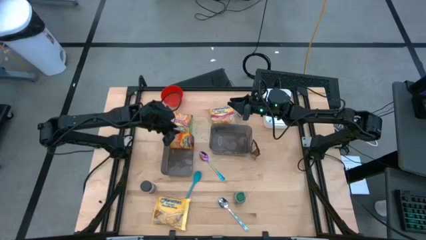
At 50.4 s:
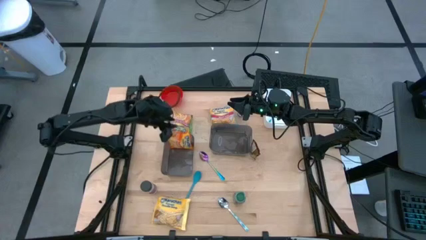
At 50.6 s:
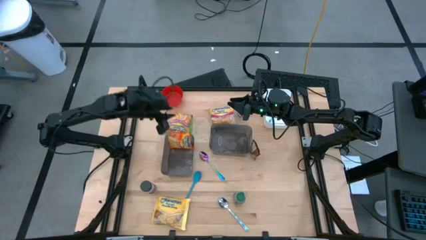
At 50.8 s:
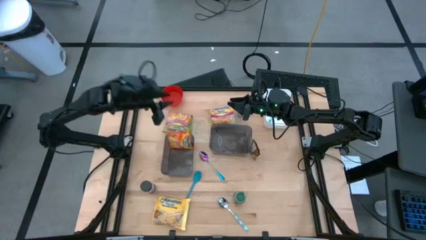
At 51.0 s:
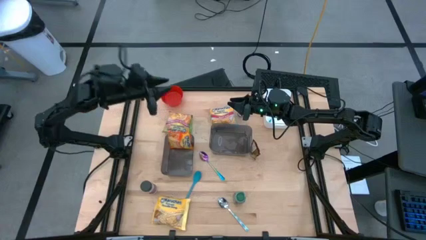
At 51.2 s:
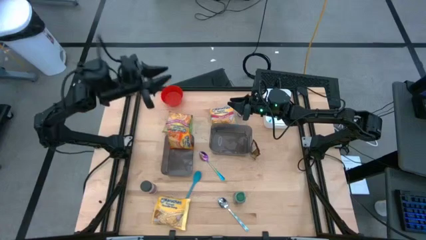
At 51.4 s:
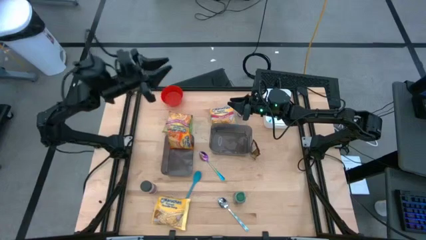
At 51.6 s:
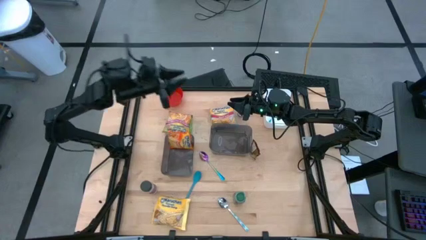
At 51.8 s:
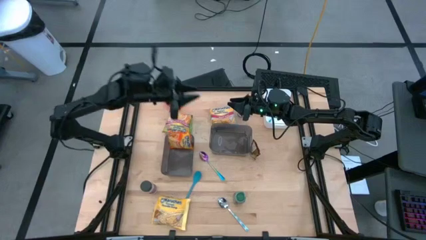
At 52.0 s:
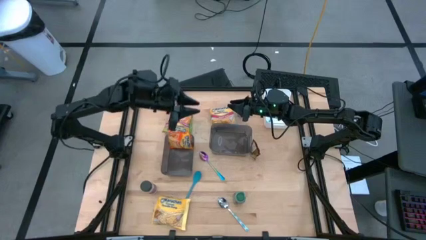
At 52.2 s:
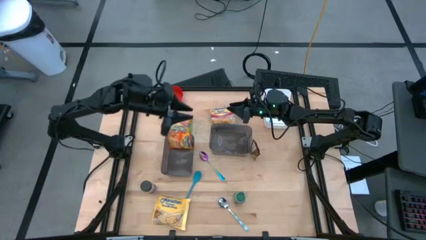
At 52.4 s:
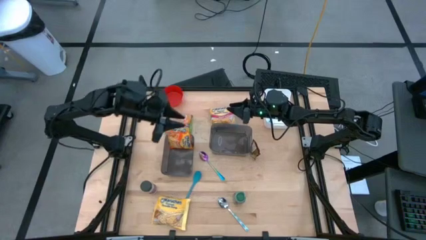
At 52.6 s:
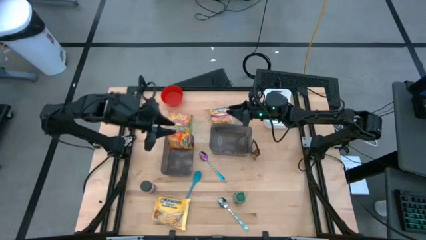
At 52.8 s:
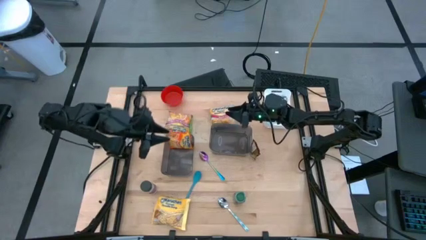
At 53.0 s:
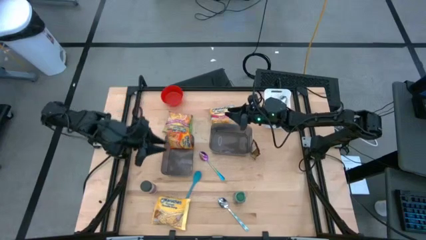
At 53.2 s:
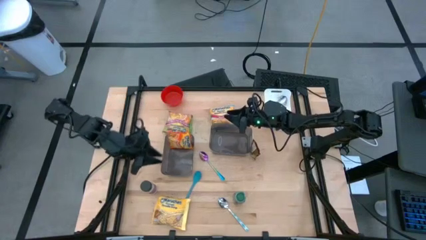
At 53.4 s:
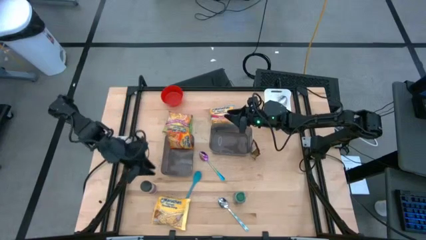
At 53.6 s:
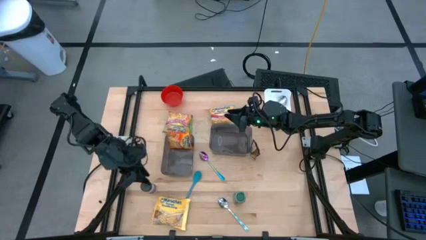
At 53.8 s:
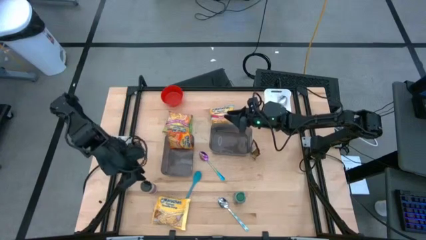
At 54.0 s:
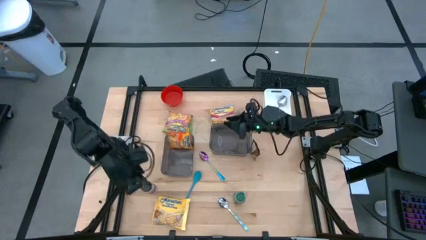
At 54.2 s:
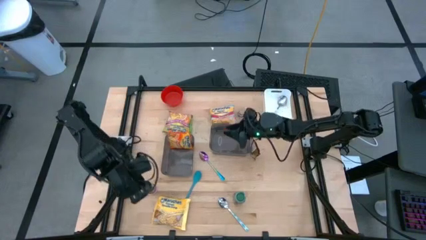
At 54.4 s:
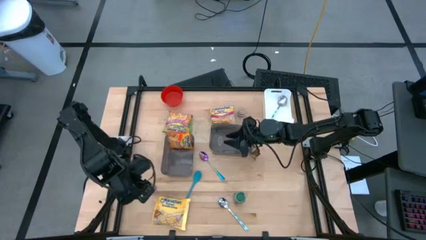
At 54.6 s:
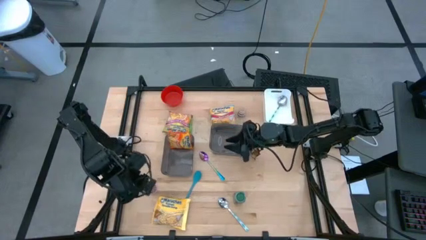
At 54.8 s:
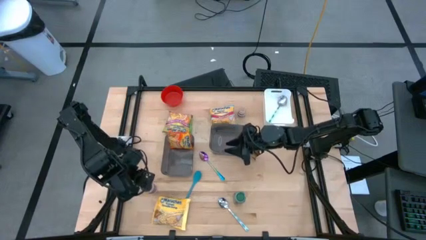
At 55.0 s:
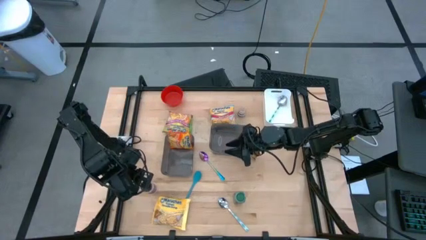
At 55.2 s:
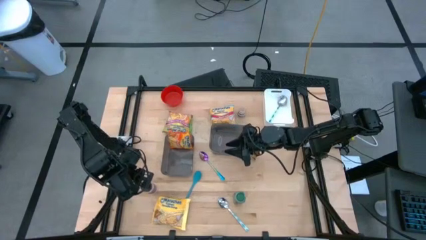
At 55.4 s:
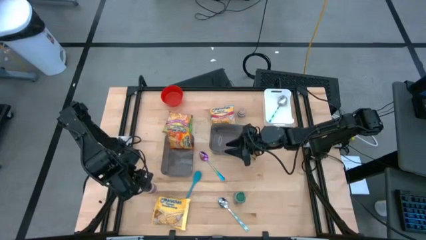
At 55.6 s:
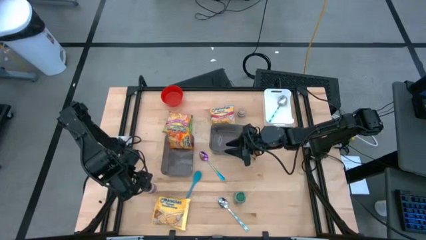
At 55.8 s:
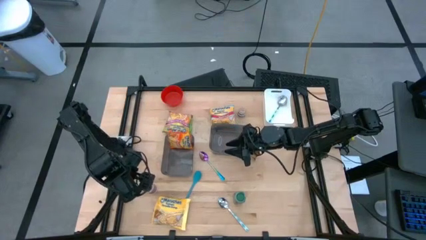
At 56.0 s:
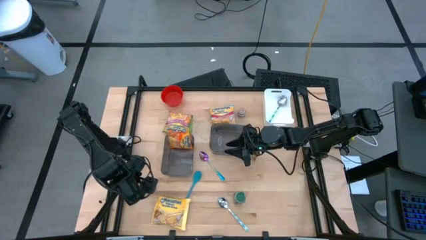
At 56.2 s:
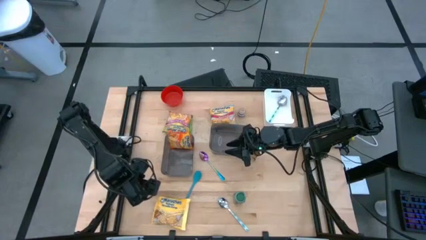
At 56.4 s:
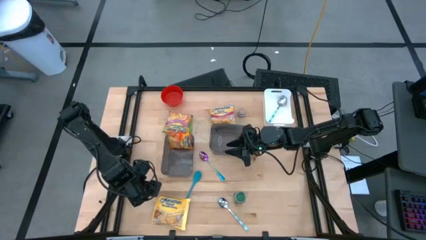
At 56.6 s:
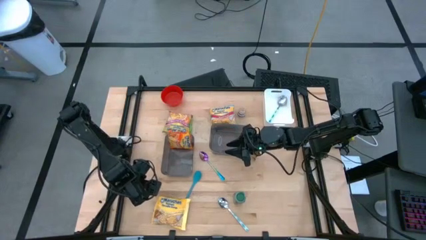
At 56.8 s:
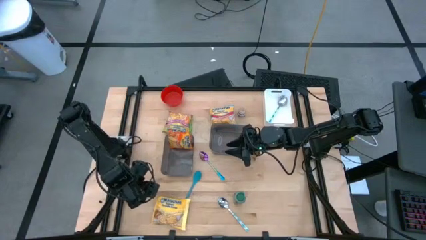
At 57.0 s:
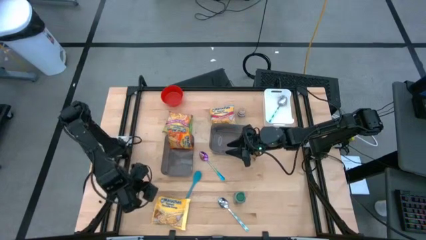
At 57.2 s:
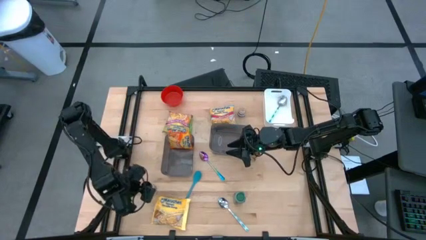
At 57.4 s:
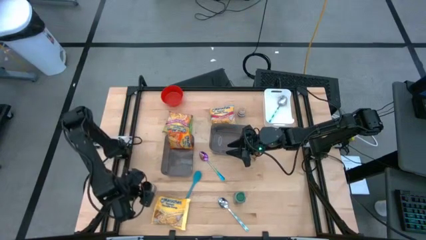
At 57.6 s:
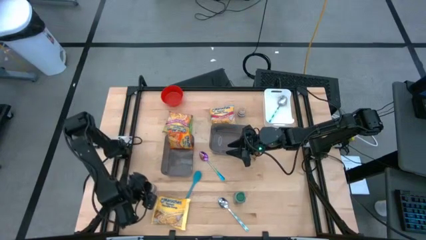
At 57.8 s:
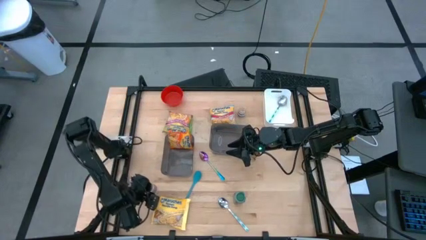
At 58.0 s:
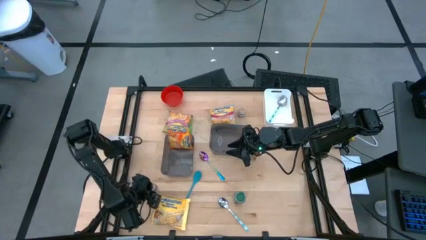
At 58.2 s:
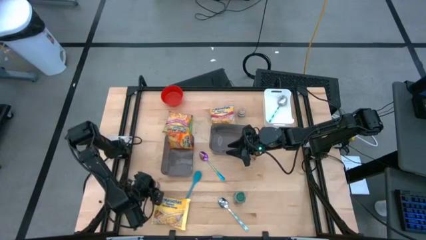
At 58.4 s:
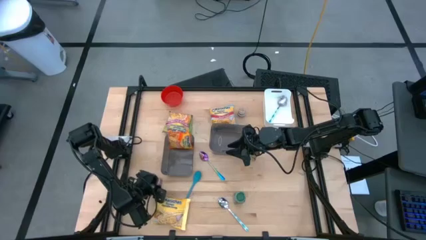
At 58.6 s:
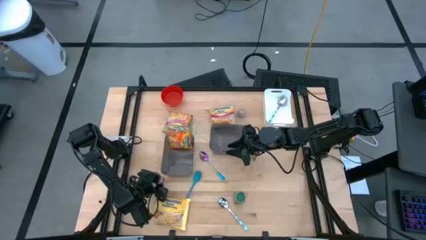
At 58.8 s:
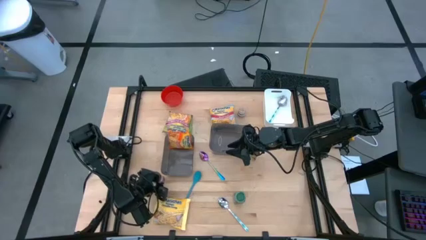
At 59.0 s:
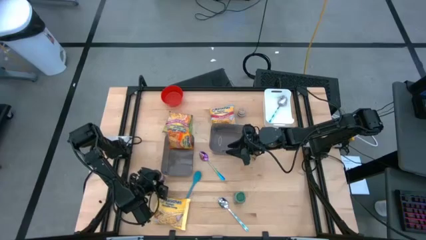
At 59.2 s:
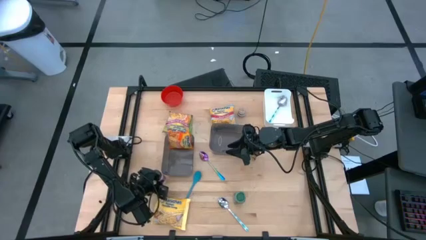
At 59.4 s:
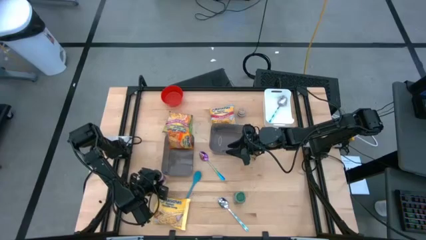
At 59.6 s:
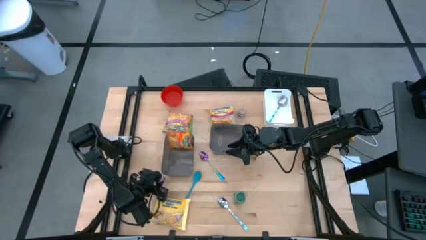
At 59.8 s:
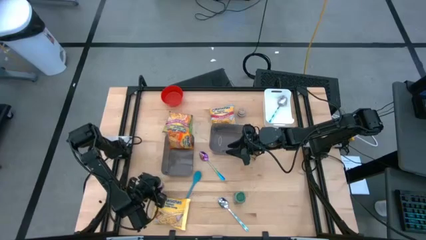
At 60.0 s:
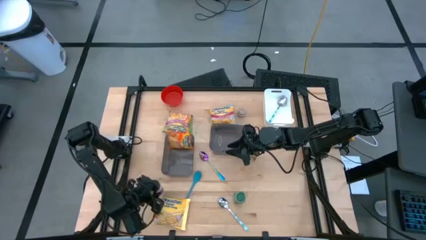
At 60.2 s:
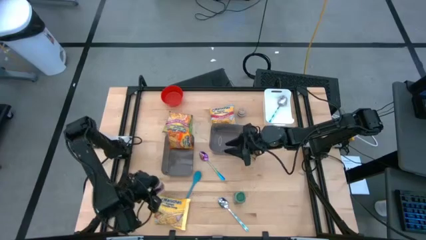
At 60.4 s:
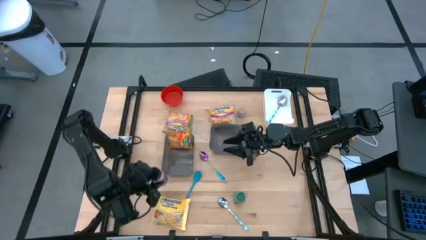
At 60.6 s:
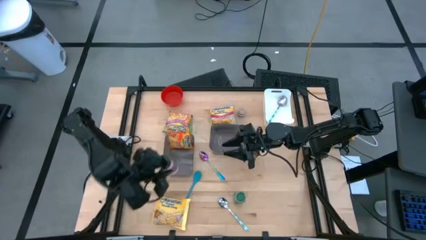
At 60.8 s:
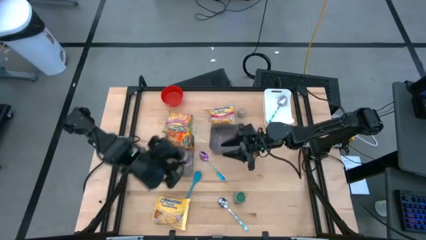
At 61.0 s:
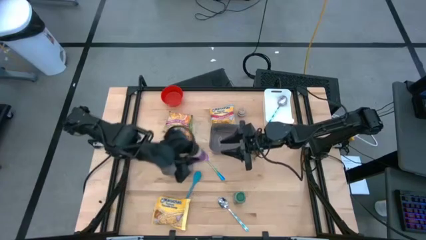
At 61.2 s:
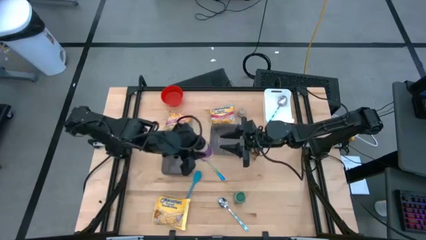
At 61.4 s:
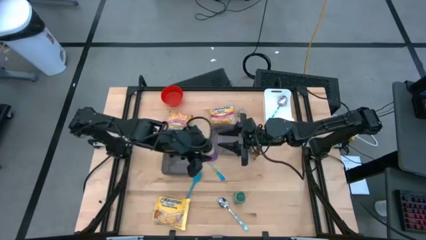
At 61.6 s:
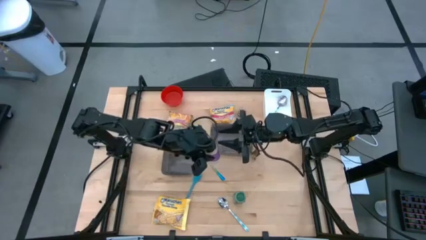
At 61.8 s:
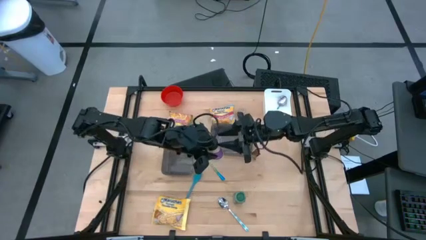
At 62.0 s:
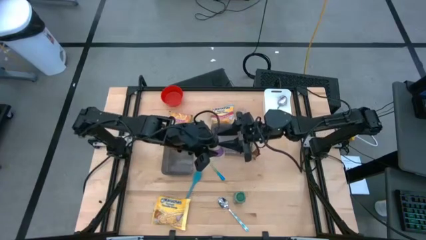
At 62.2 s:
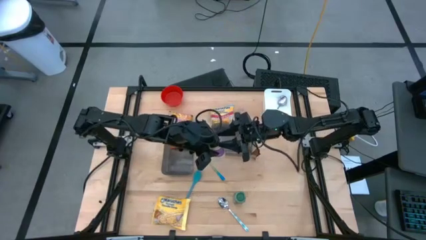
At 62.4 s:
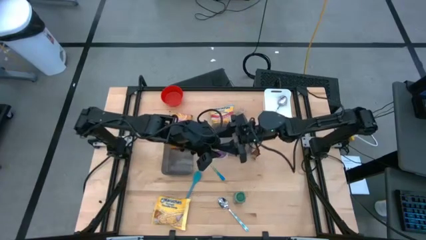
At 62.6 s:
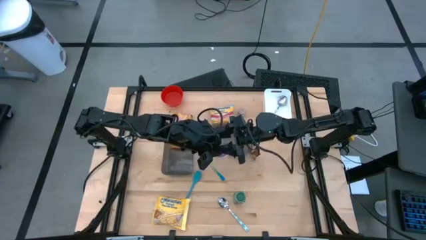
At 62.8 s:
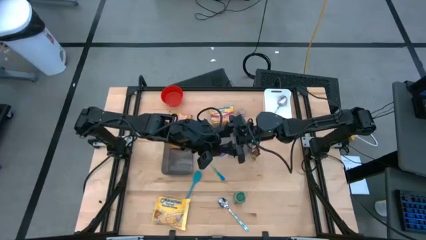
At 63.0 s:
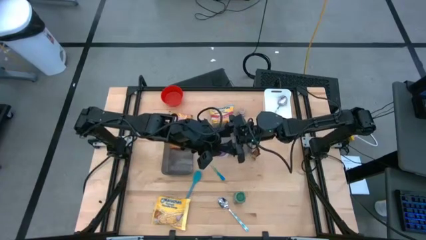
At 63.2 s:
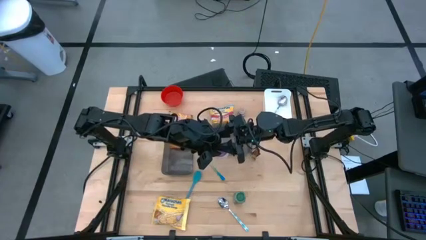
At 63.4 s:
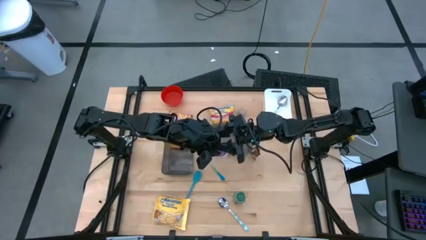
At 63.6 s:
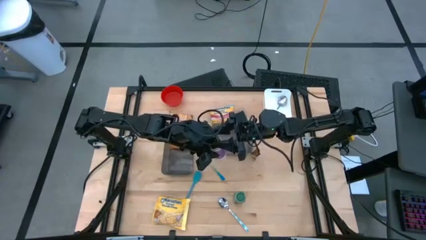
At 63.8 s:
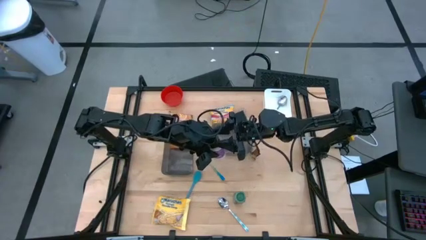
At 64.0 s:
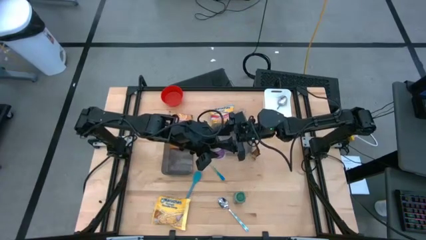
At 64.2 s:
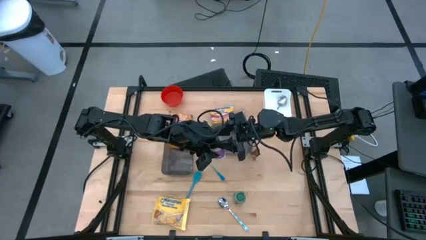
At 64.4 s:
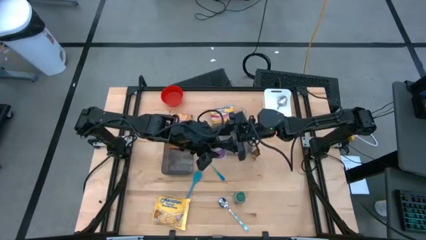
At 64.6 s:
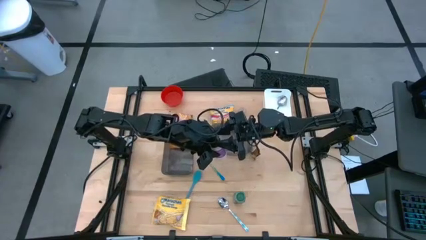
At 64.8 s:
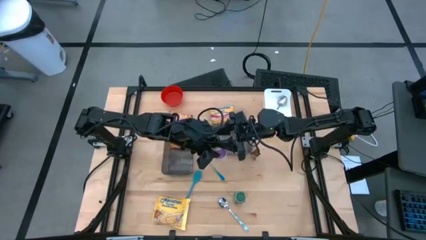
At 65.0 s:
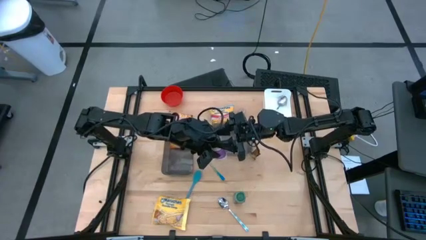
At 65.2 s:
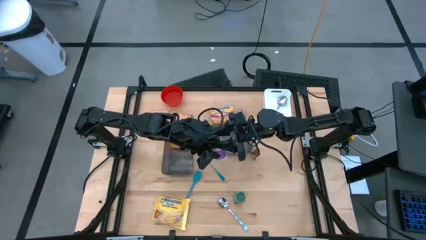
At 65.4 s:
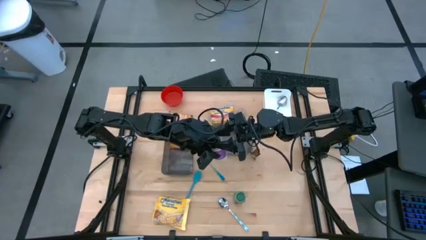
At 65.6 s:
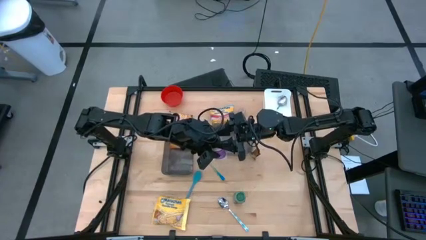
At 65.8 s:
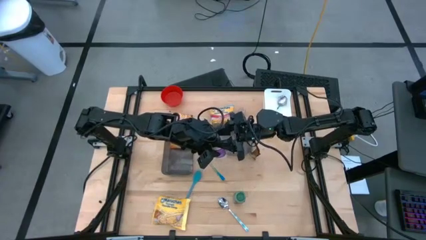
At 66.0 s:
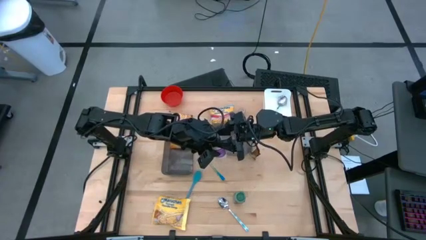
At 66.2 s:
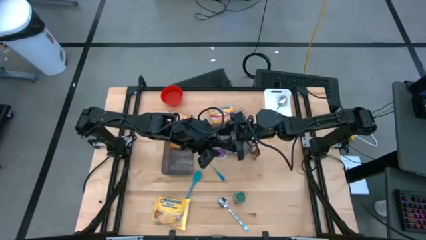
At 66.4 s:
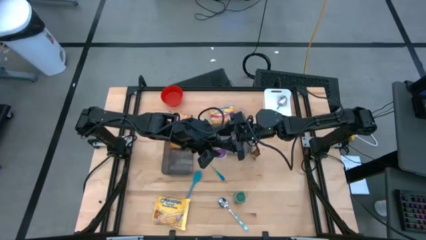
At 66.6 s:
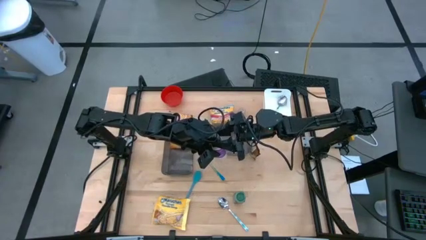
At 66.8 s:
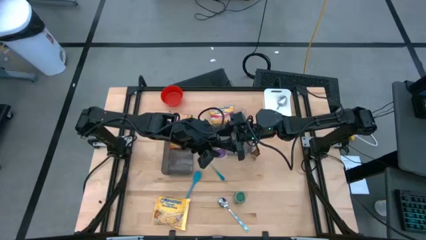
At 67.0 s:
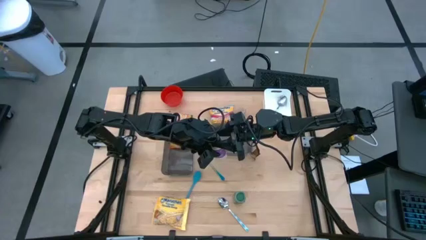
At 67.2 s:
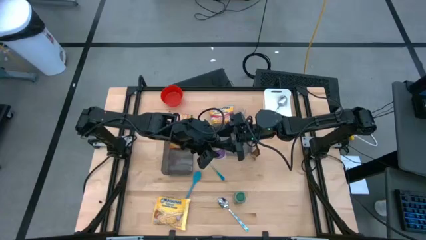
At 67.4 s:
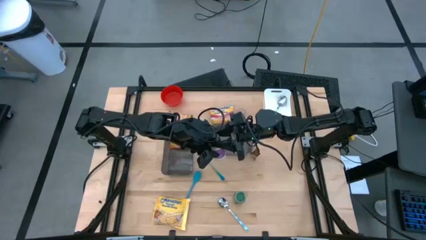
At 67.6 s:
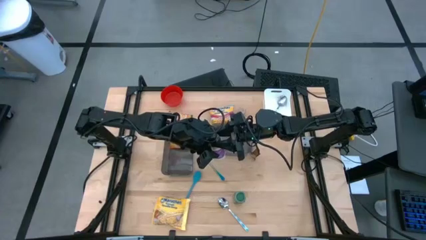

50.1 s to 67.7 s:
Task: Pick & Place Food Item
Put the black spice bottle into the right black bin
